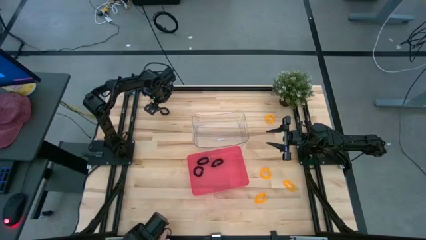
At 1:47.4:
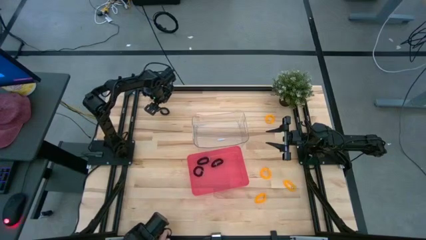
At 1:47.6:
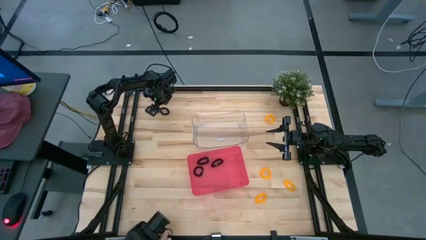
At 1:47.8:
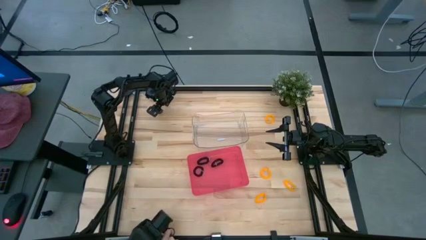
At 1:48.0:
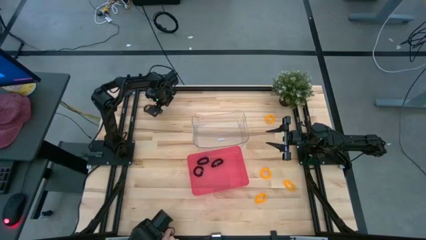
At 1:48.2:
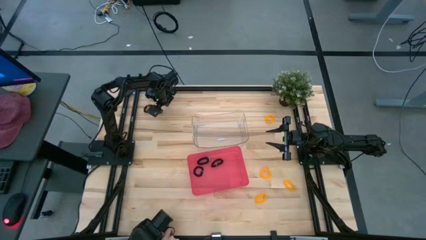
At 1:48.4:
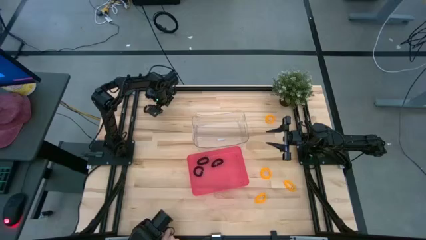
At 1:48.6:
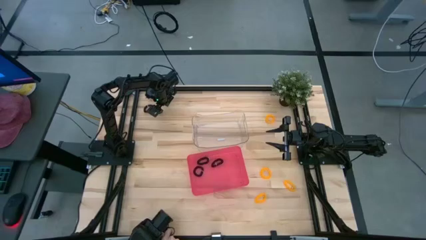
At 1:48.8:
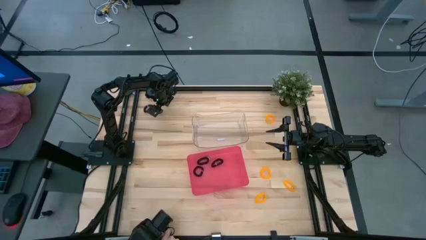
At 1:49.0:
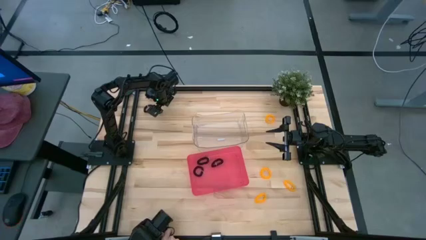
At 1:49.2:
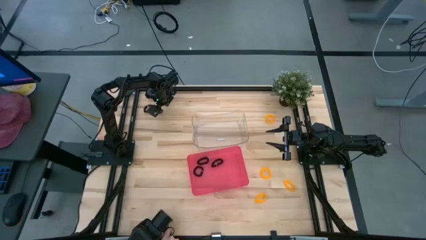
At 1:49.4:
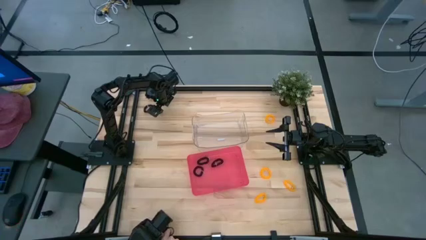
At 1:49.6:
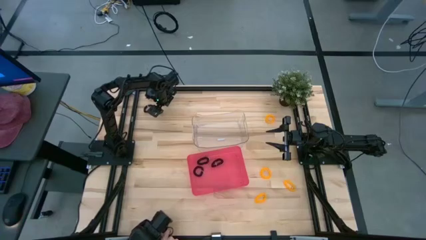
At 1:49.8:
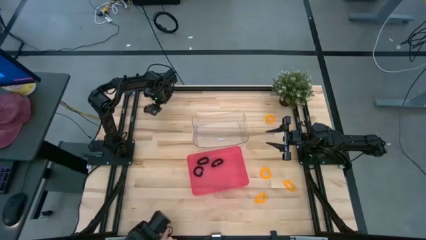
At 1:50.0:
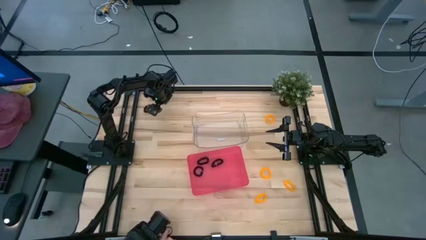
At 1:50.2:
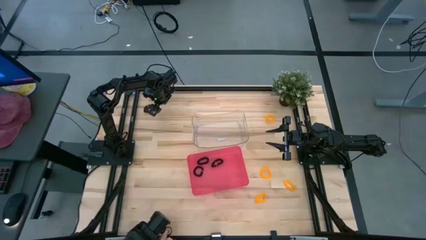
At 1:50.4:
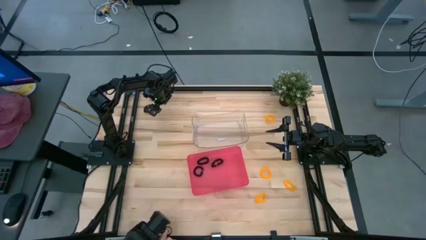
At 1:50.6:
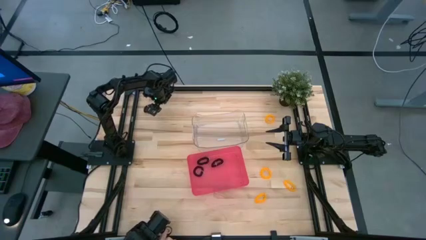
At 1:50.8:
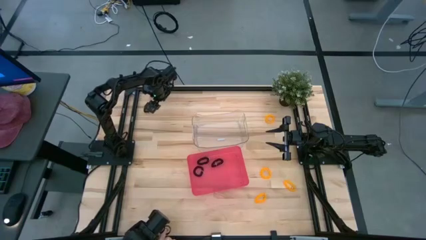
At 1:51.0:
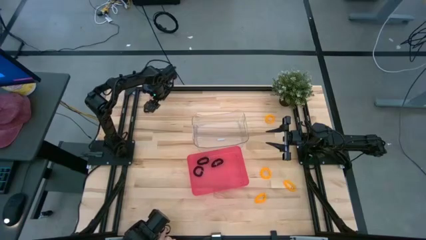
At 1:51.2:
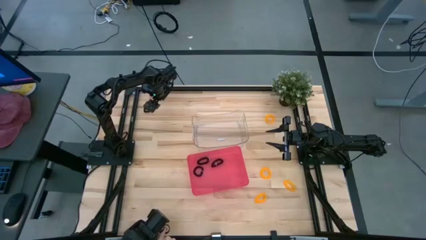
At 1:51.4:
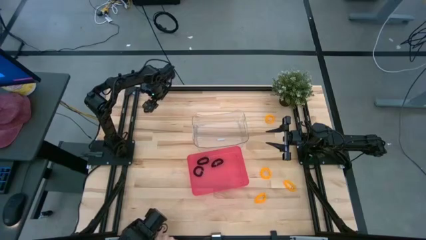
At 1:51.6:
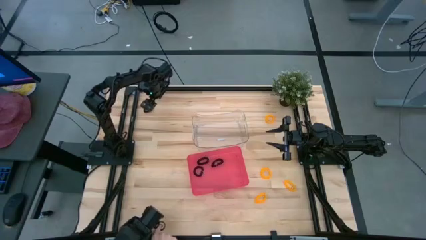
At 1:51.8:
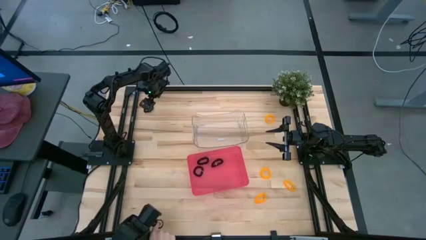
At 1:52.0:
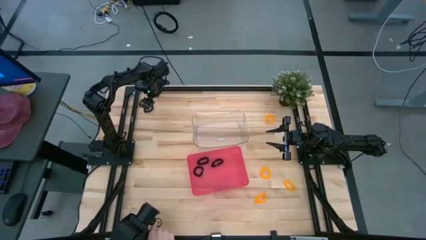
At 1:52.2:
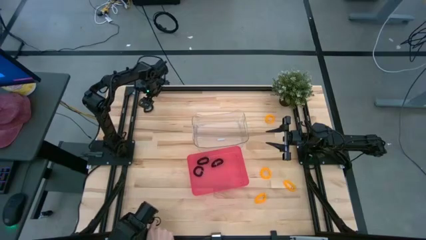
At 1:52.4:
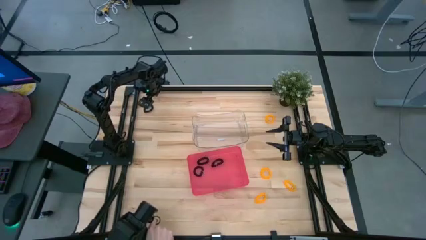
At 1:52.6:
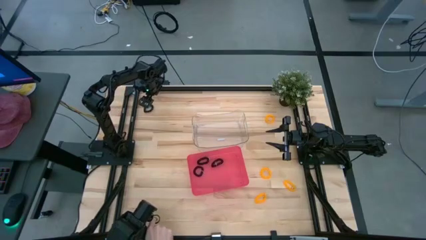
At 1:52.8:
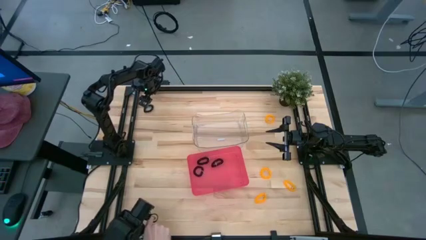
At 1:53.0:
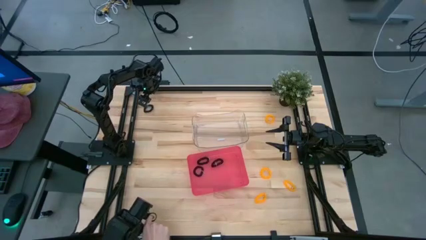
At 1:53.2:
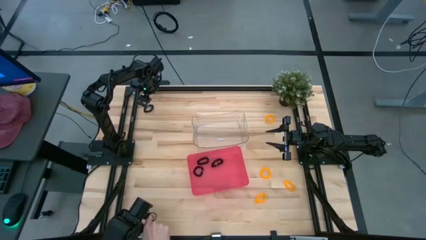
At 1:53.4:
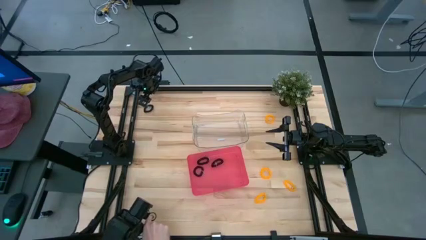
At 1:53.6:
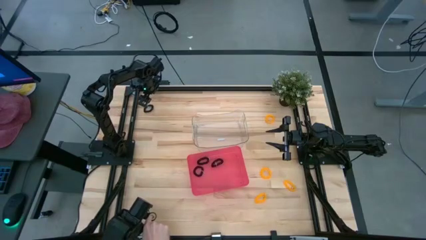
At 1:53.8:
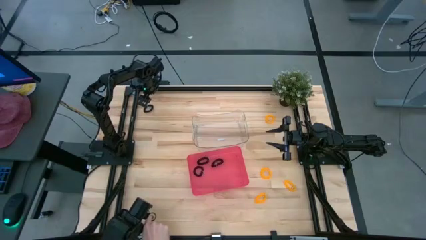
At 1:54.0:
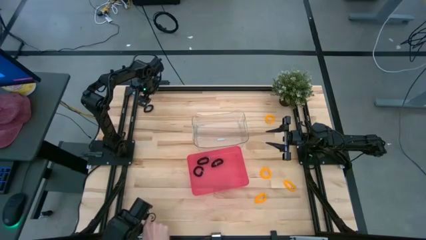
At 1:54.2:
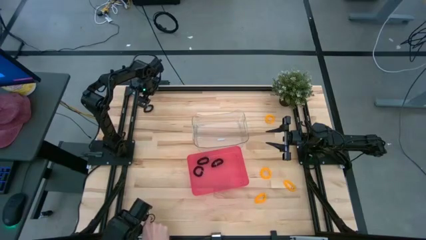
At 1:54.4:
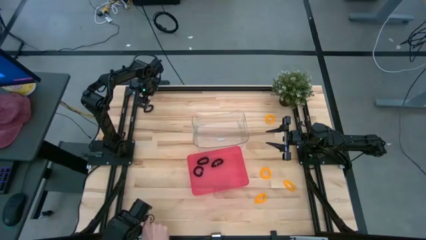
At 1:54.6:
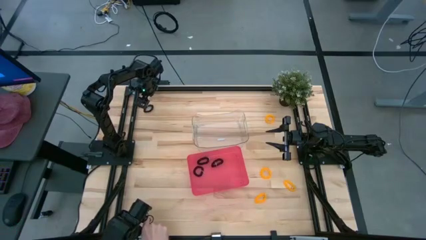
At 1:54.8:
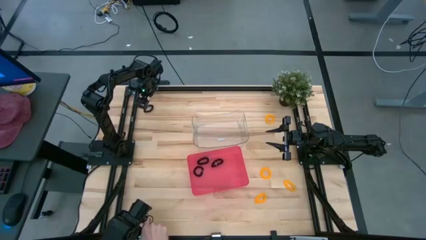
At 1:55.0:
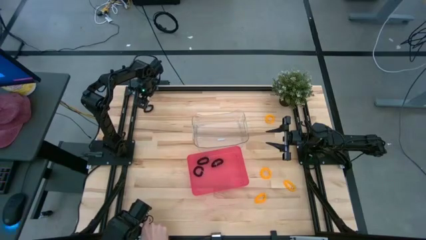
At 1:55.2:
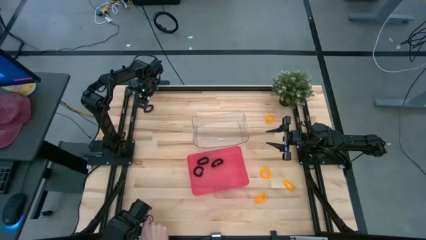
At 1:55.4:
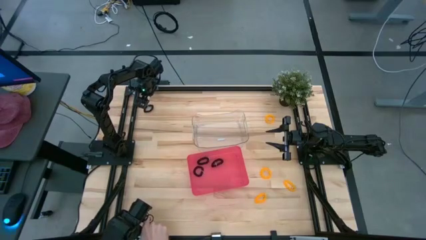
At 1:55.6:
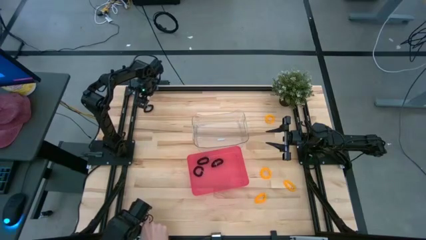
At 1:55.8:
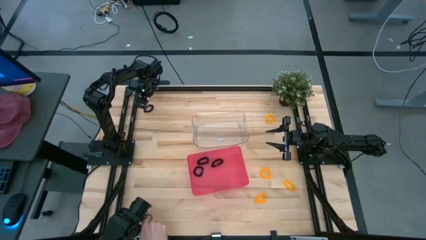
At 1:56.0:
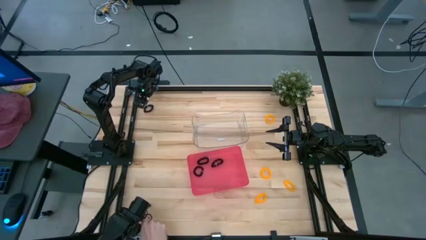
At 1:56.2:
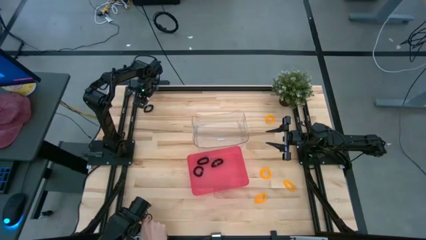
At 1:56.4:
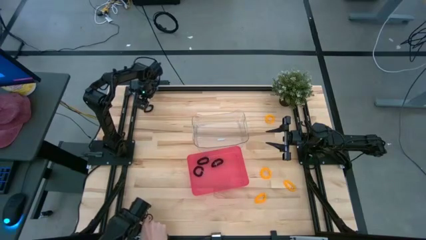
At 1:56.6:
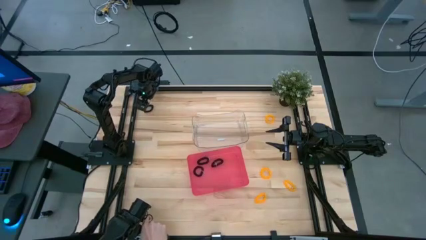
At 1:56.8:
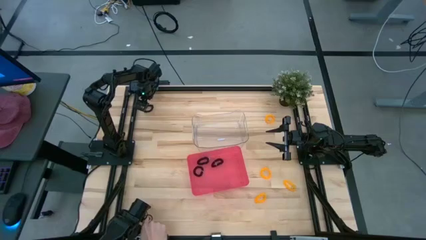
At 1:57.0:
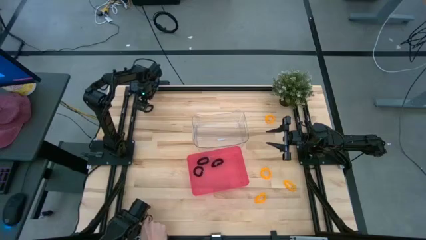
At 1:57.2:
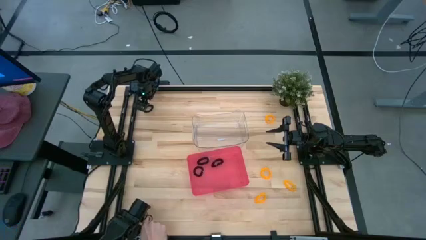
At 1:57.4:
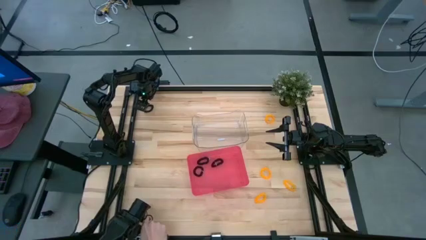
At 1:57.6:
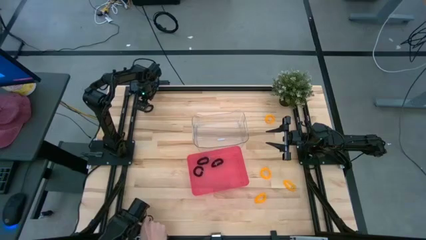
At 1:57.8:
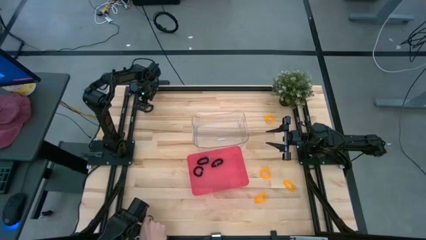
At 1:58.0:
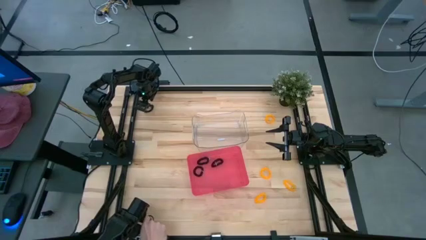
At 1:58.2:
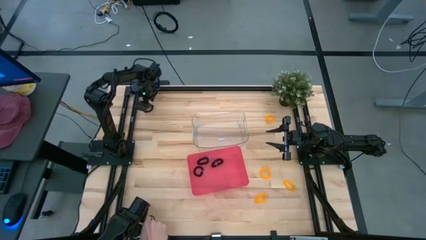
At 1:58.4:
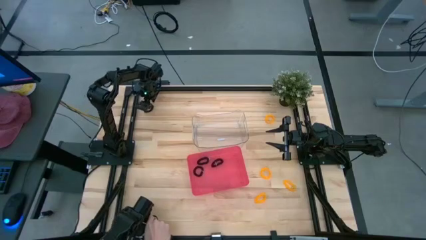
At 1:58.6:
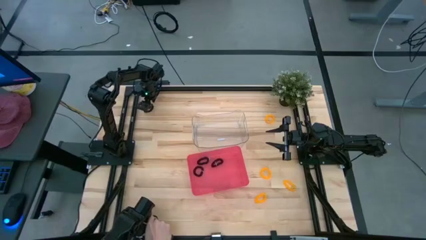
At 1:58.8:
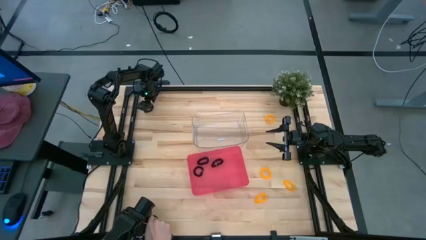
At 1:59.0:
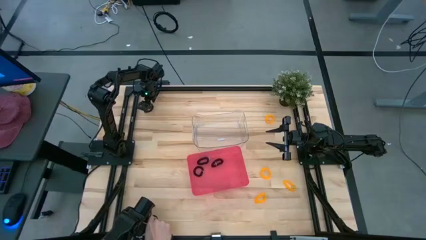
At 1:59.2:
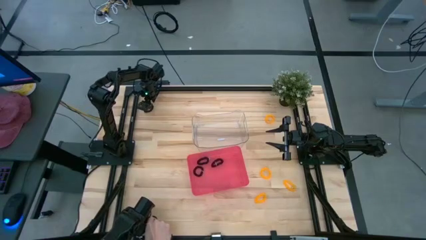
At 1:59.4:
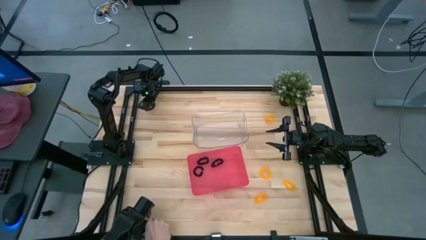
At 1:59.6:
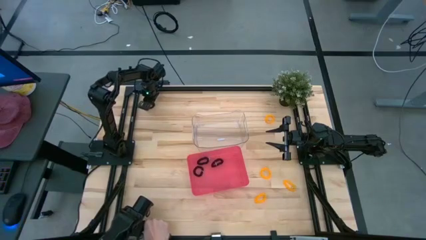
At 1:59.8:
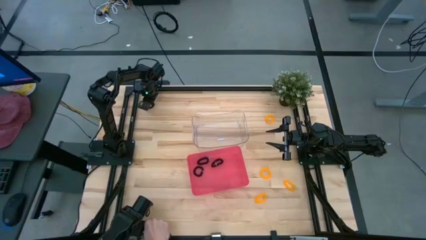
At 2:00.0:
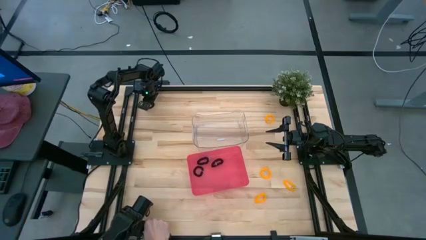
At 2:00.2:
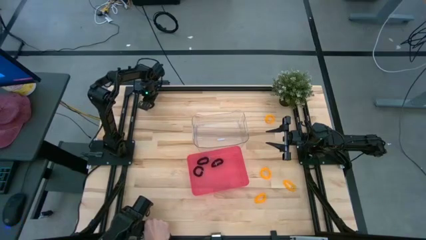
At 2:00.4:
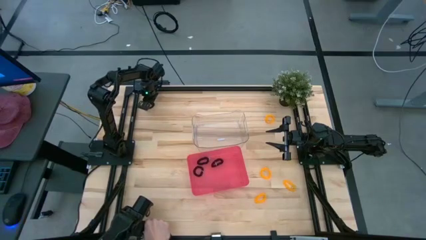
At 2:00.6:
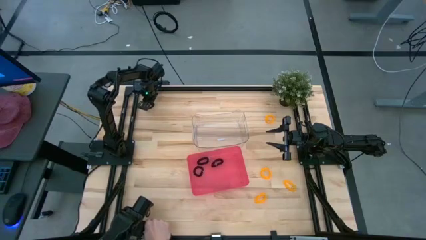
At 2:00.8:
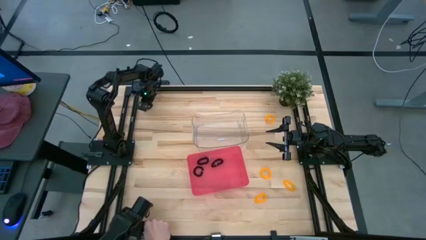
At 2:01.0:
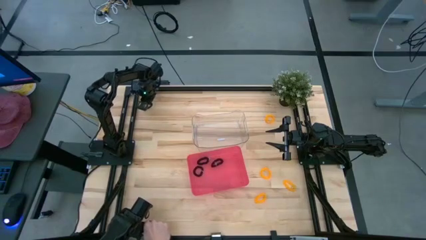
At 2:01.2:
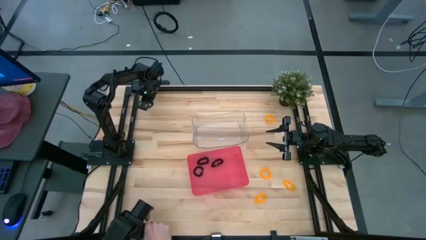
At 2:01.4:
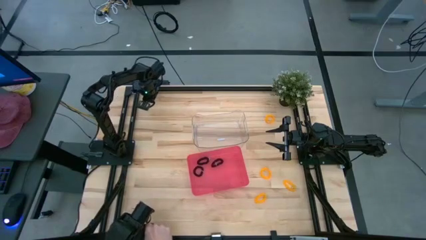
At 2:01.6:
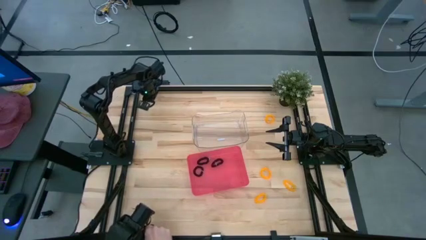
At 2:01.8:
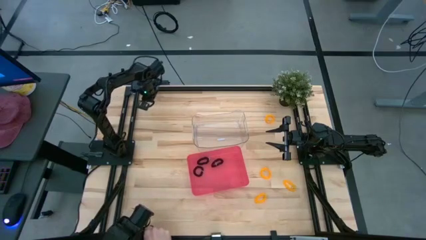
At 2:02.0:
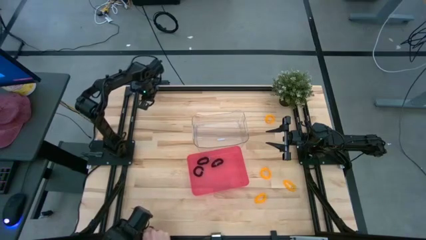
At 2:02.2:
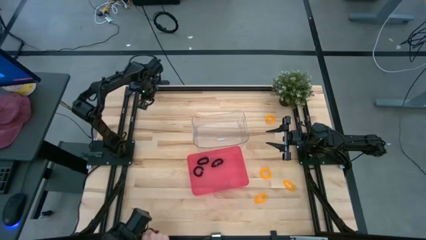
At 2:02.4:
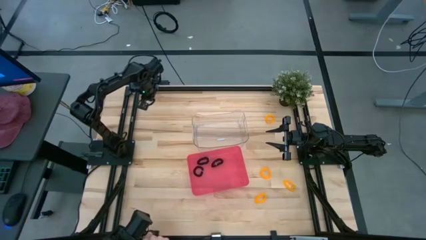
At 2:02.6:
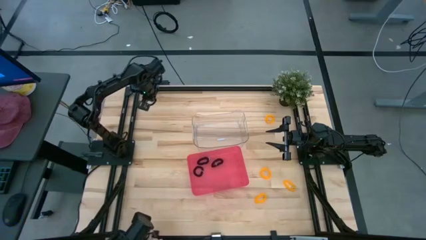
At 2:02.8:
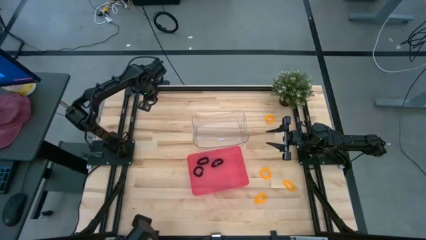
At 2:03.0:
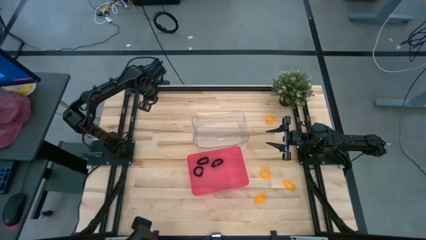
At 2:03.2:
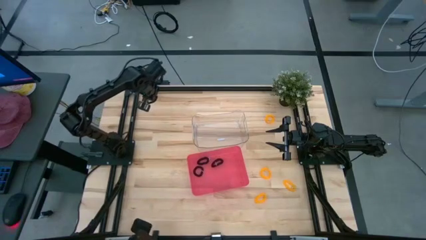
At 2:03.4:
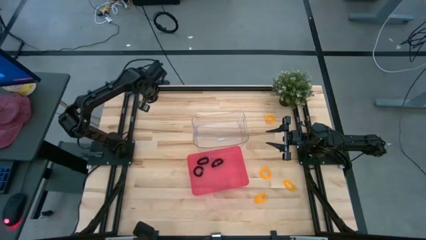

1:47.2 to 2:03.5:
Task: Sort spring keychains
Put the black spring keychain into the red bin
